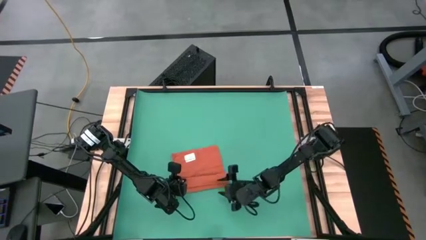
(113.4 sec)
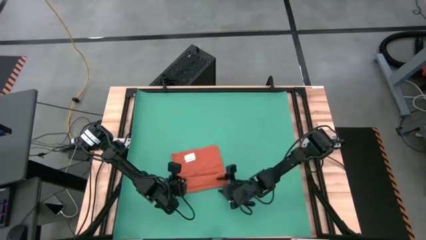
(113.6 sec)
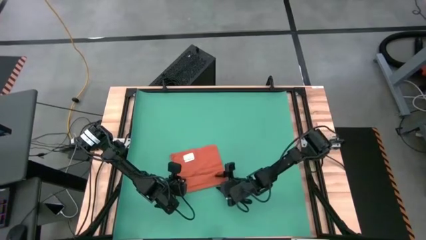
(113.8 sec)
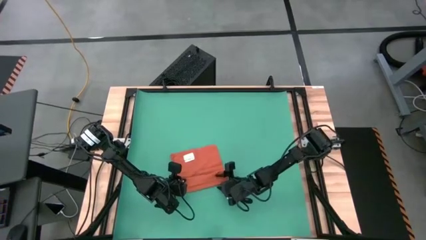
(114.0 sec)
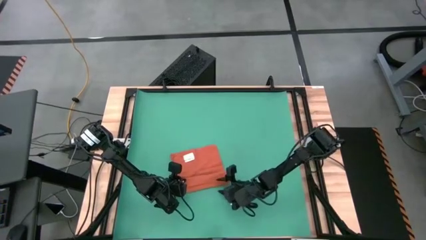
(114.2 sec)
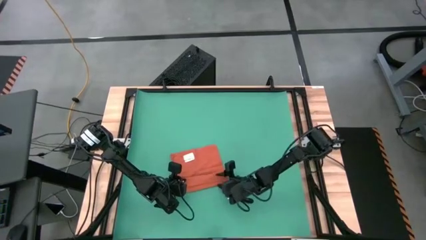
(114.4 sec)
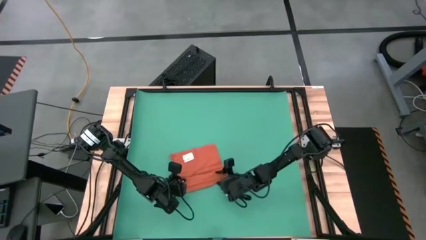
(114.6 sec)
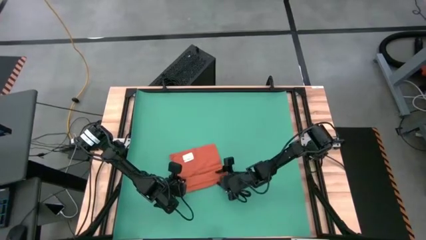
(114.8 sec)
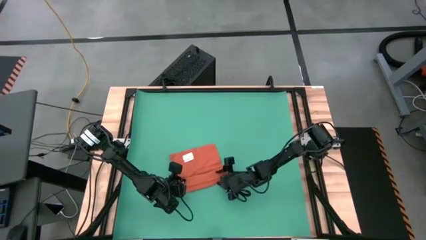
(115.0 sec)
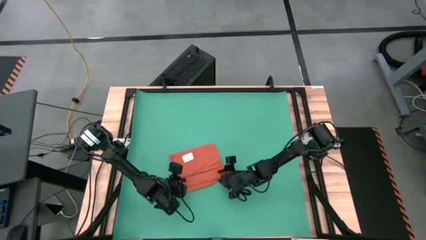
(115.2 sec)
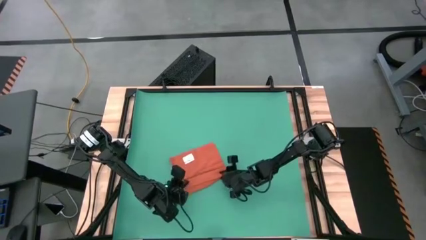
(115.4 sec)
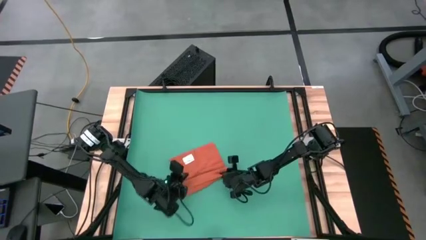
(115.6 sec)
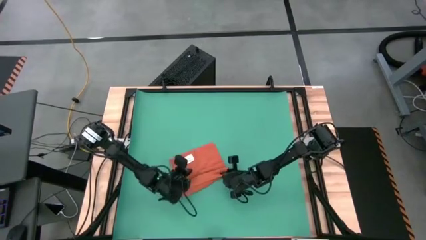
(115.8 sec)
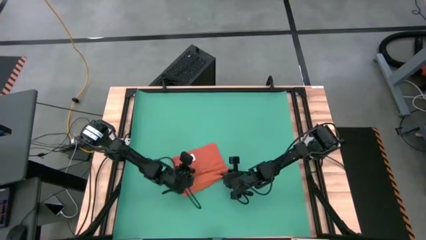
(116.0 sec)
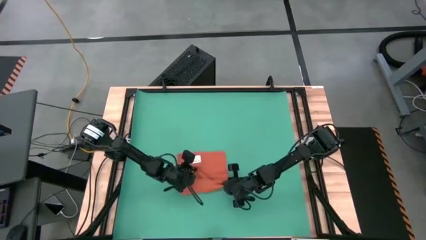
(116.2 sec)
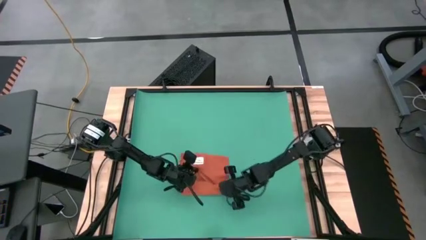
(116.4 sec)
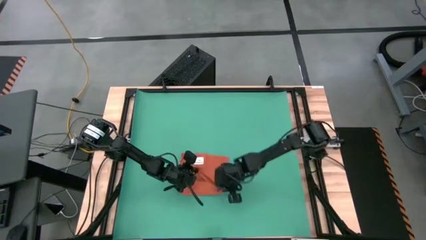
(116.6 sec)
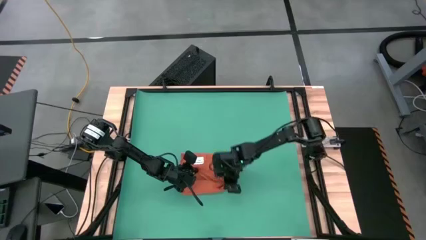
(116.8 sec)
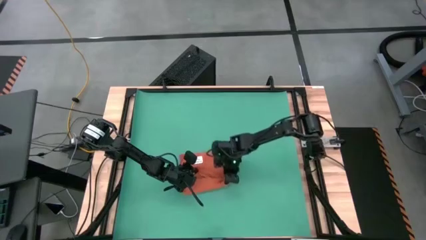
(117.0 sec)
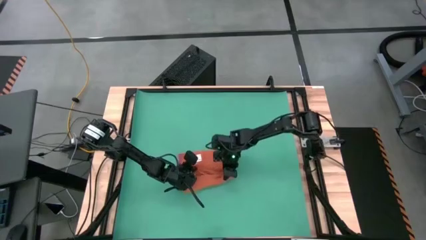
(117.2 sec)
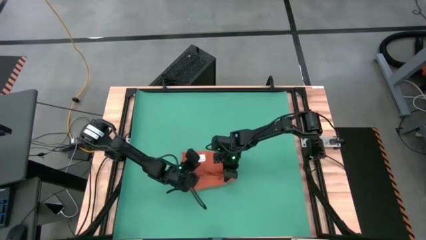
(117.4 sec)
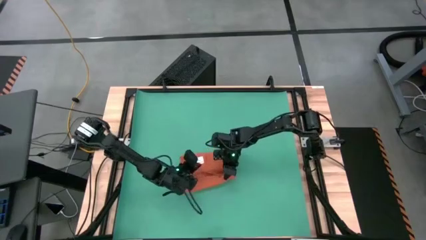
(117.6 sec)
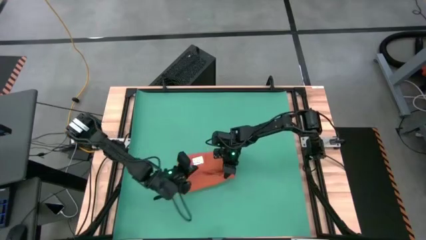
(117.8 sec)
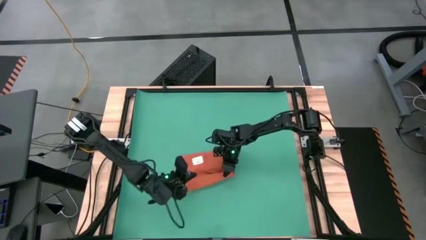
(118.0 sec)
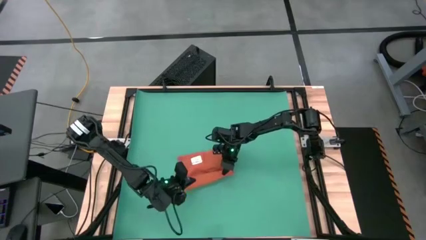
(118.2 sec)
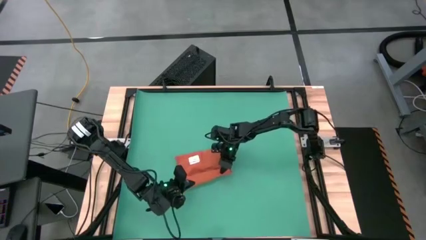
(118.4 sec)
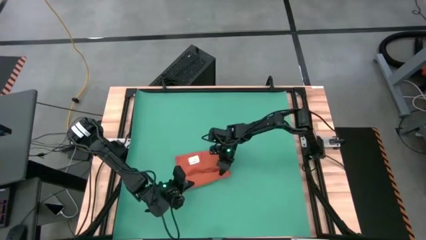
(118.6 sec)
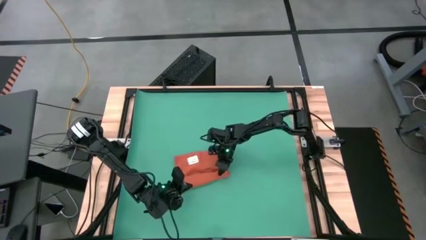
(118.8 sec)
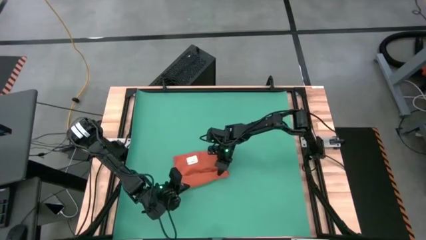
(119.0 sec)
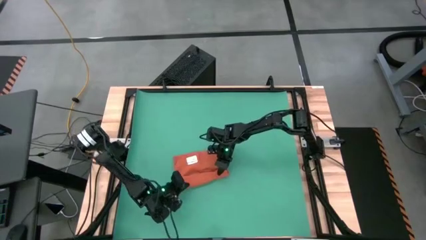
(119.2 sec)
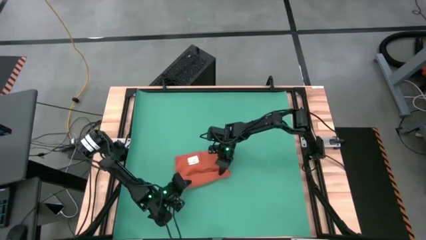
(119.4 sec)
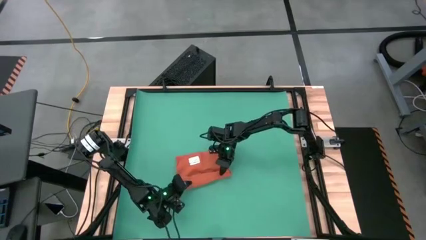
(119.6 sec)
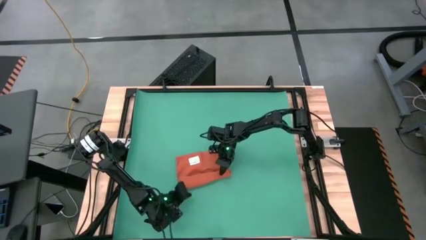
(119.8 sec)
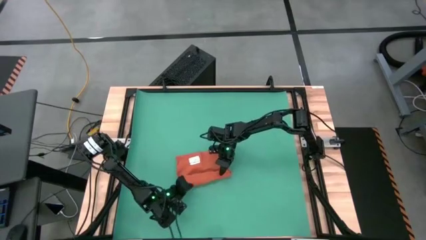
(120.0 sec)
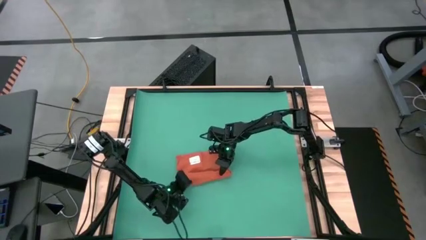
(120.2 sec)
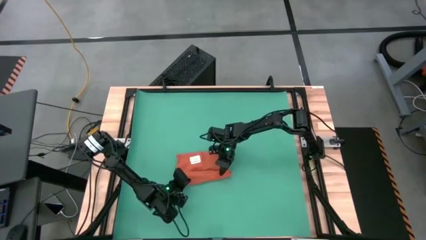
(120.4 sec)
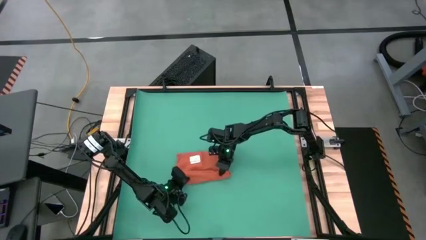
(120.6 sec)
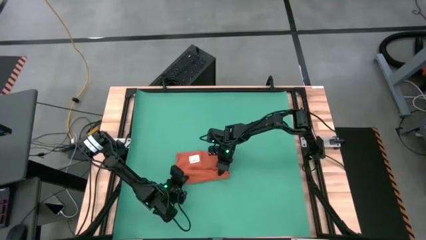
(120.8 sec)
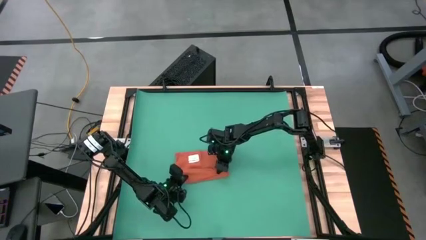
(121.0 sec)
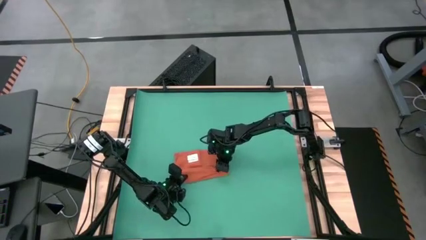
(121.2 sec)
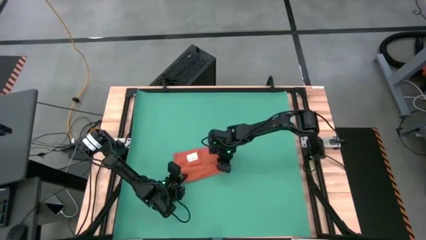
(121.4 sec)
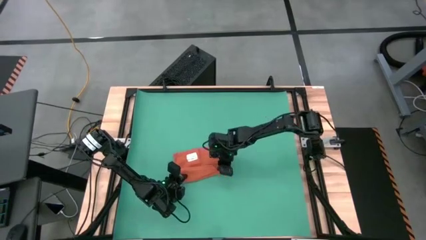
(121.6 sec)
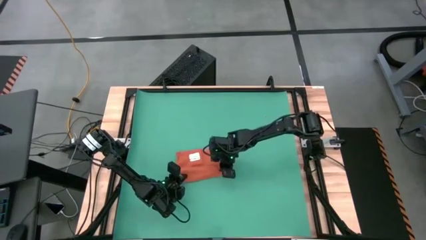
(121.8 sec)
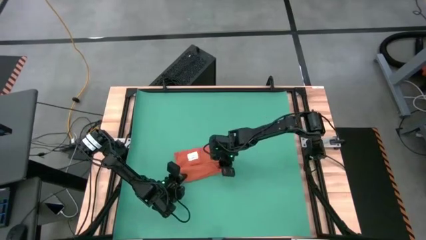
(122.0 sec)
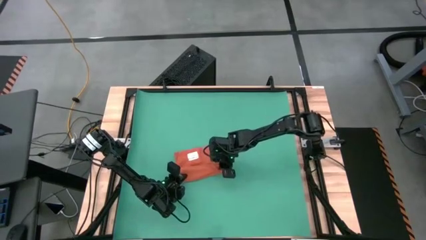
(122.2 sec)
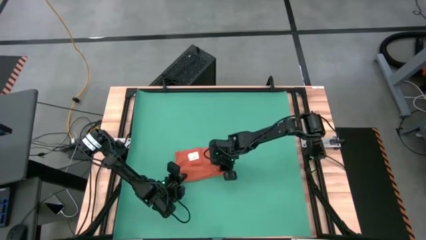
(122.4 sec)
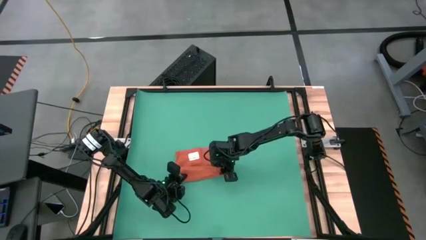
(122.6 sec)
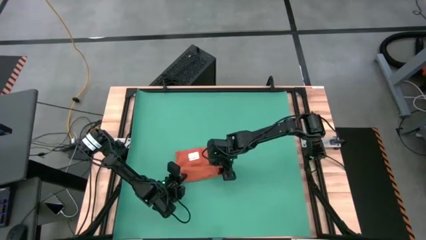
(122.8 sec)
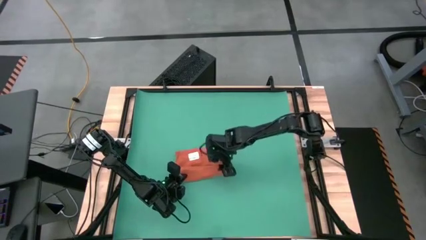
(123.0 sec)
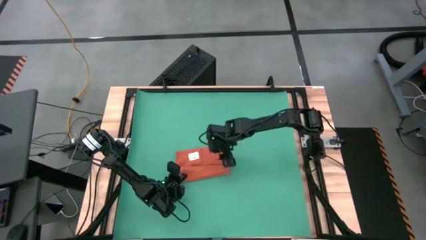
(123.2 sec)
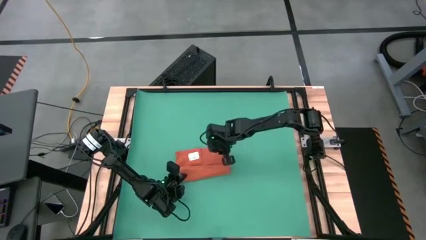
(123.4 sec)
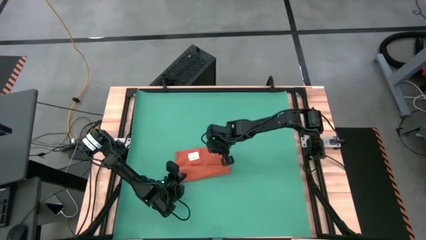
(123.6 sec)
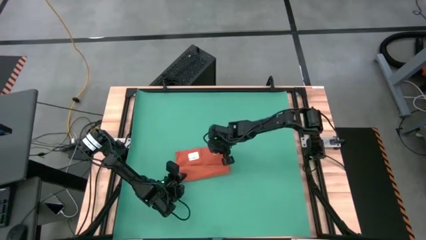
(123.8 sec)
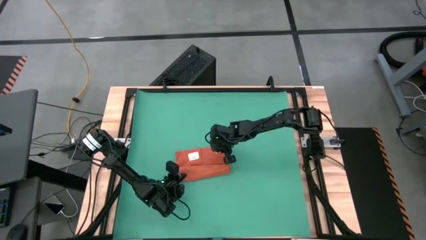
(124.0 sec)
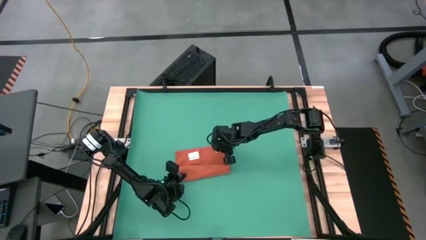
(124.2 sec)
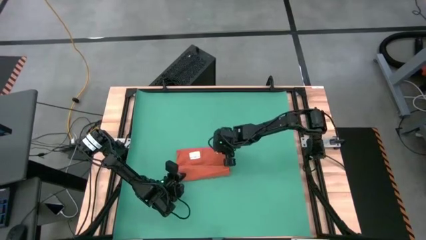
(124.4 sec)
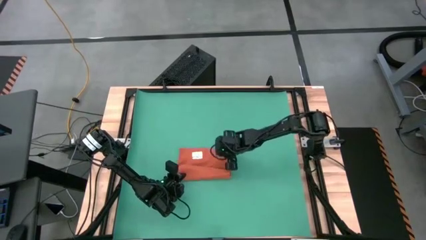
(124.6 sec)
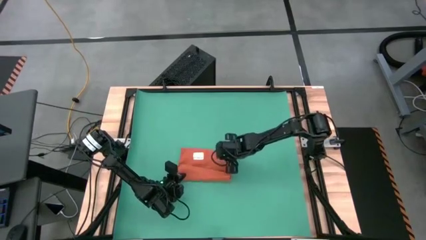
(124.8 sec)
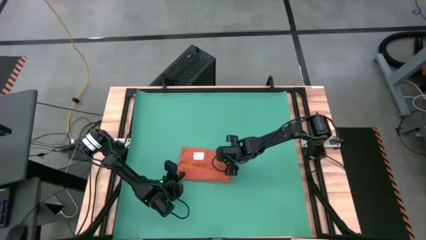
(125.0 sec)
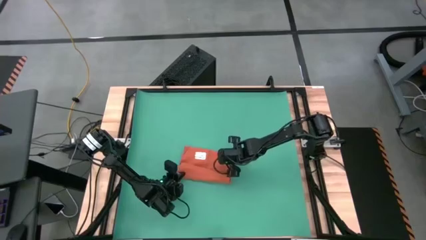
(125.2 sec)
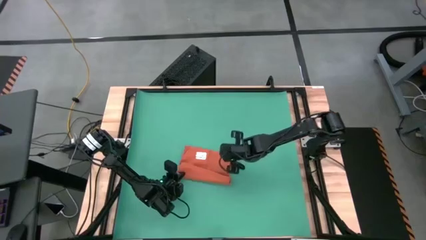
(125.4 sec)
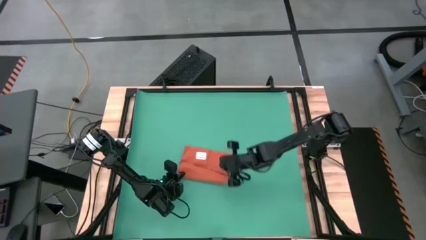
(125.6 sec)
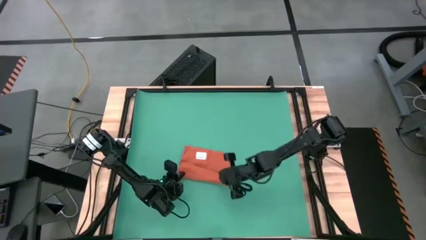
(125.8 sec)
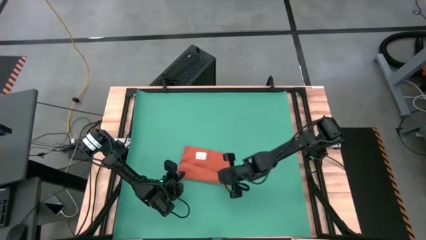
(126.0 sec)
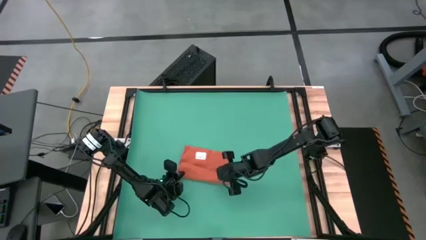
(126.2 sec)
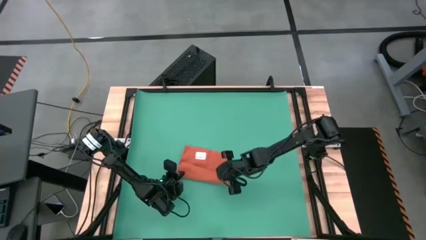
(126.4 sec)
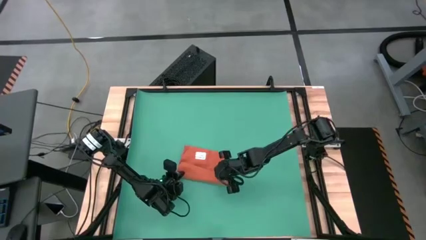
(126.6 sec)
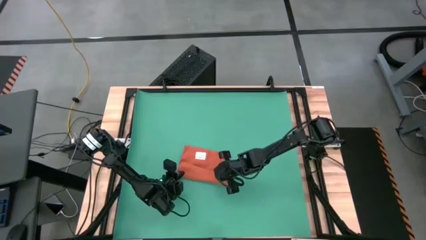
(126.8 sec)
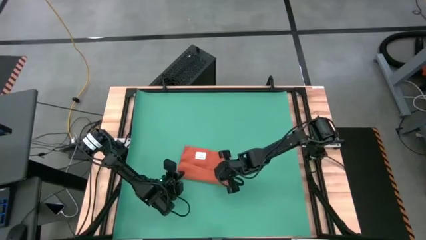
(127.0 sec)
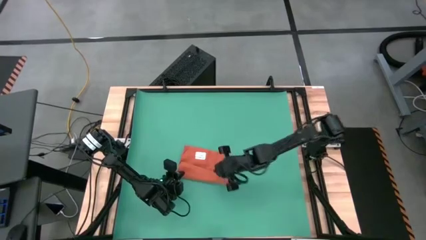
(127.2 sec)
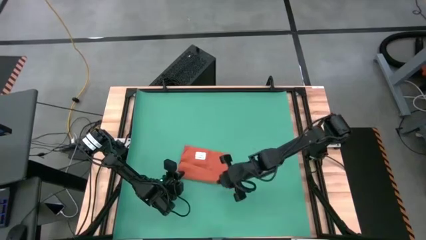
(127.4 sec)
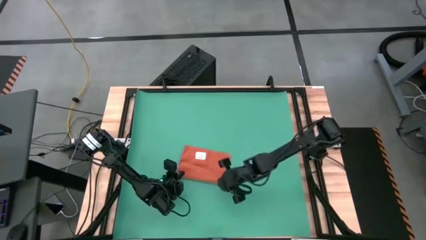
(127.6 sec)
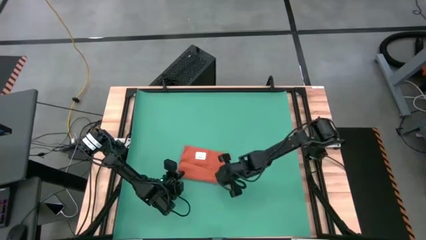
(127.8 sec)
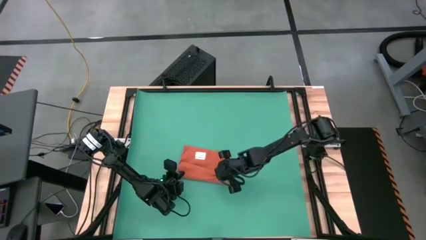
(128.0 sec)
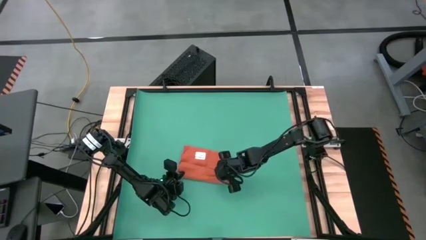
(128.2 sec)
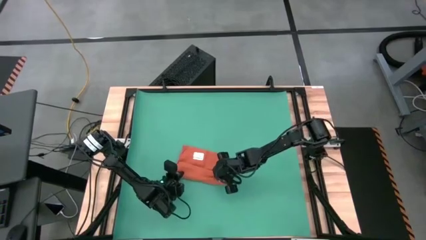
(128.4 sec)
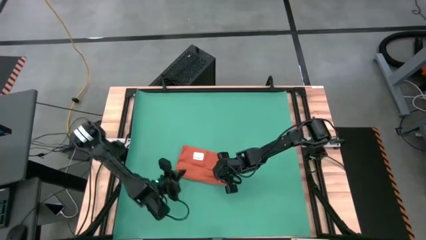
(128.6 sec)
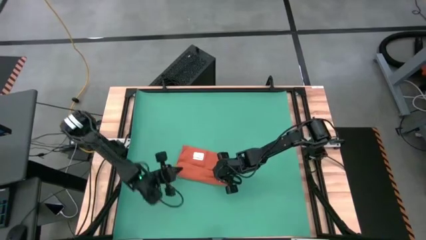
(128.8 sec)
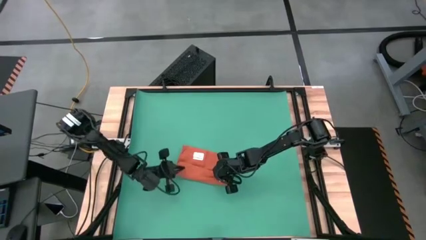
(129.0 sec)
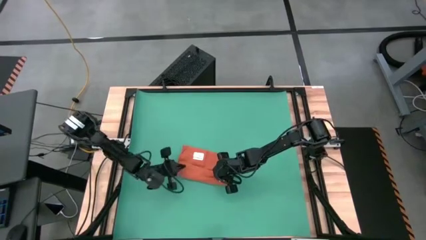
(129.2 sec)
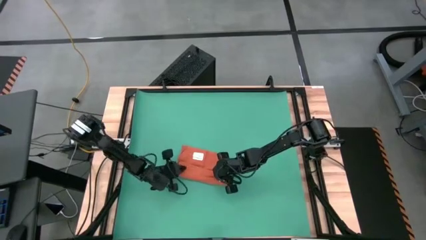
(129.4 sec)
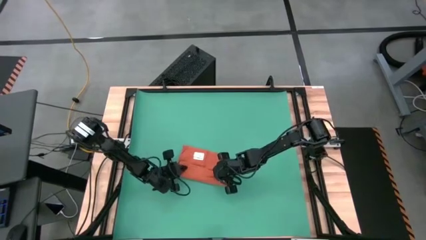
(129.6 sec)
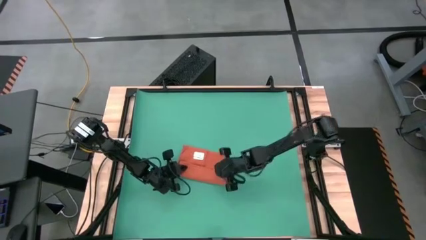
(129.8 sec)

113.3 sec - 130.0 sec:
Task: Roll towel into tight, uniform cylinder
Roll the orange table napkin
